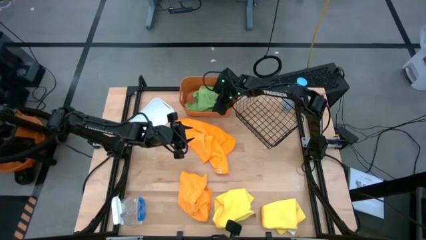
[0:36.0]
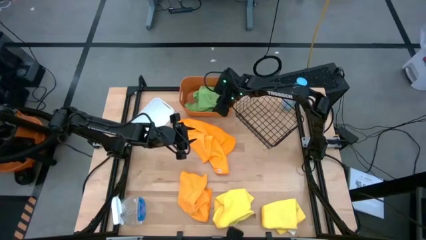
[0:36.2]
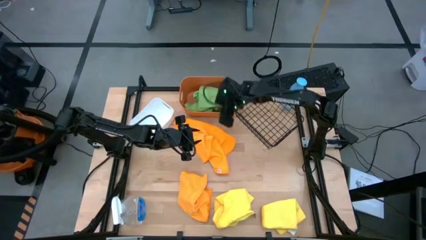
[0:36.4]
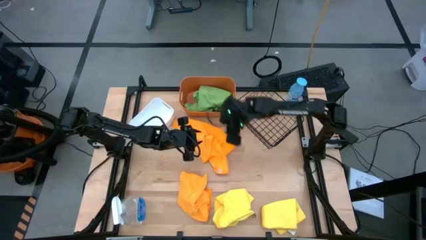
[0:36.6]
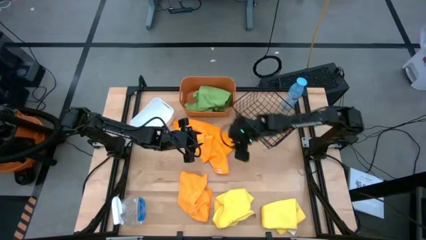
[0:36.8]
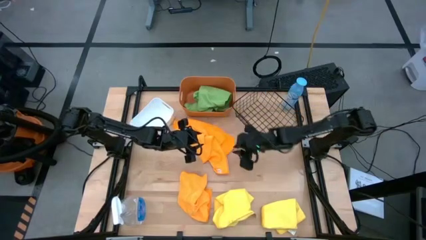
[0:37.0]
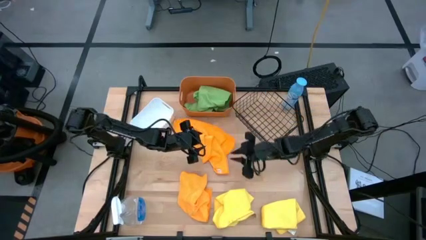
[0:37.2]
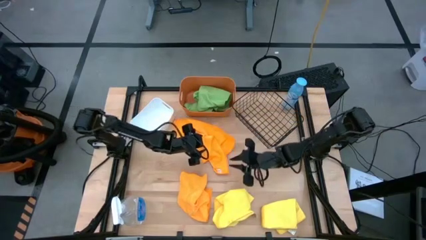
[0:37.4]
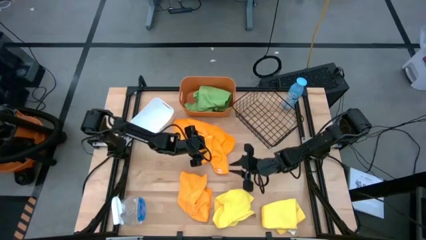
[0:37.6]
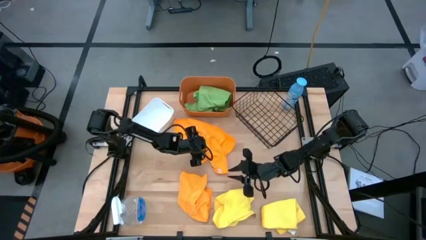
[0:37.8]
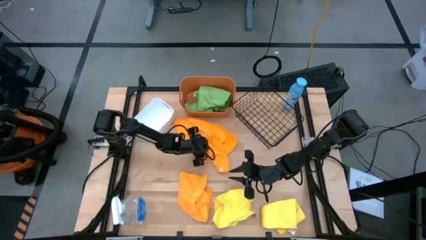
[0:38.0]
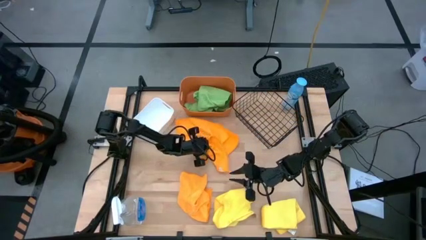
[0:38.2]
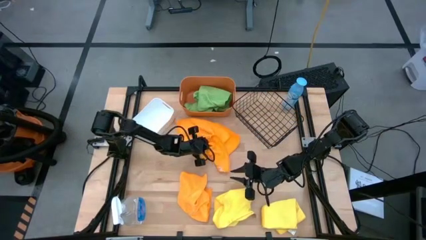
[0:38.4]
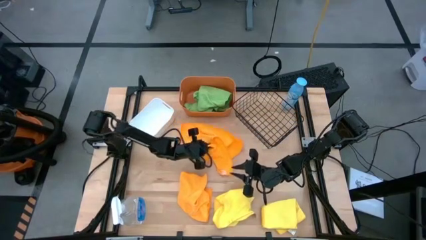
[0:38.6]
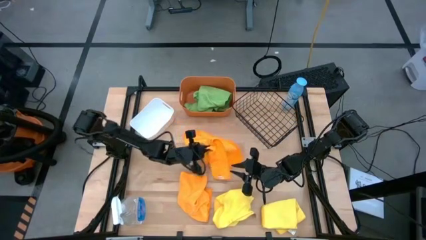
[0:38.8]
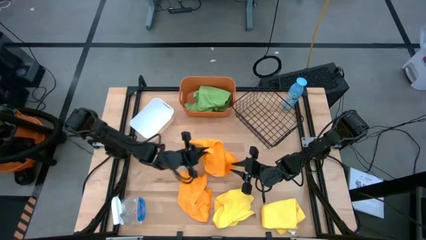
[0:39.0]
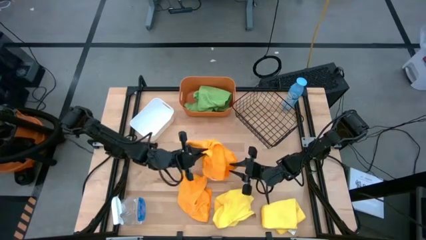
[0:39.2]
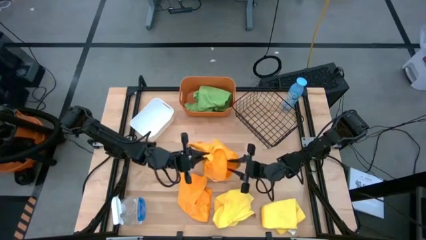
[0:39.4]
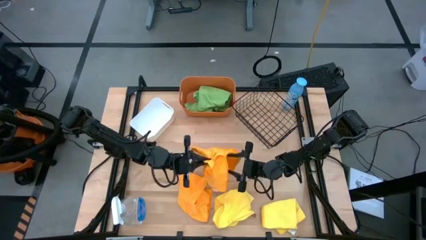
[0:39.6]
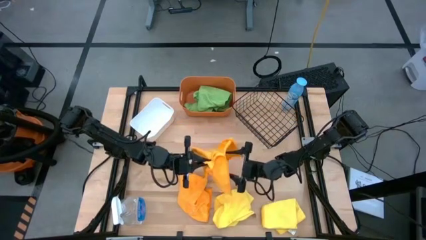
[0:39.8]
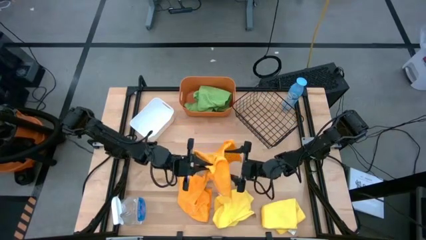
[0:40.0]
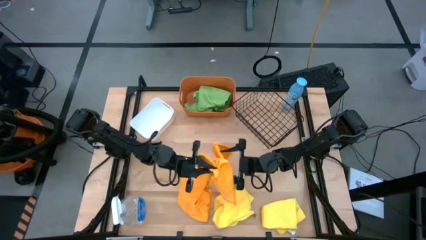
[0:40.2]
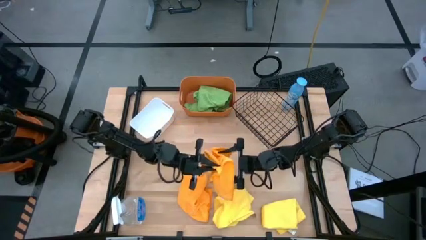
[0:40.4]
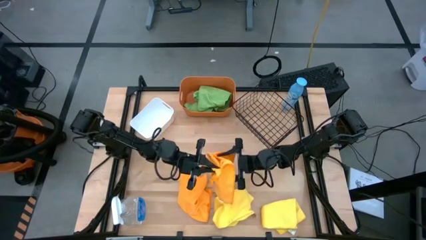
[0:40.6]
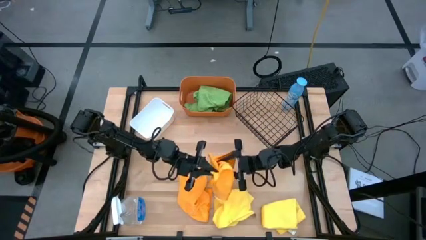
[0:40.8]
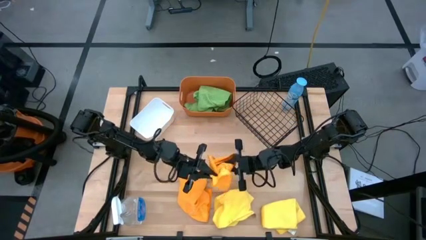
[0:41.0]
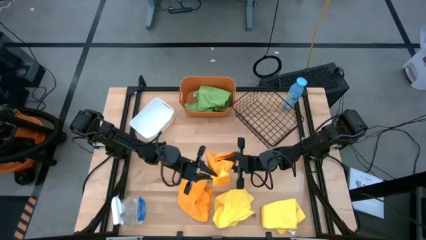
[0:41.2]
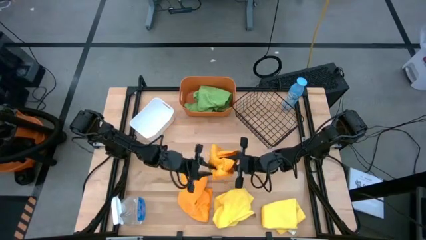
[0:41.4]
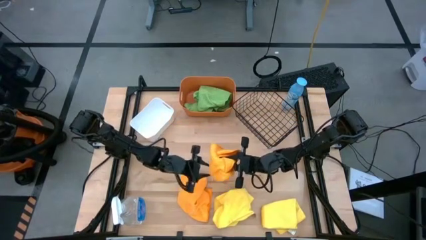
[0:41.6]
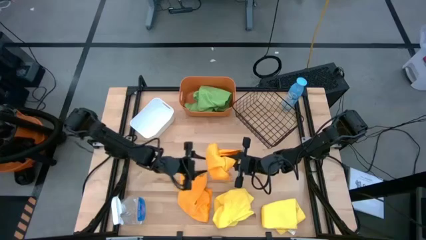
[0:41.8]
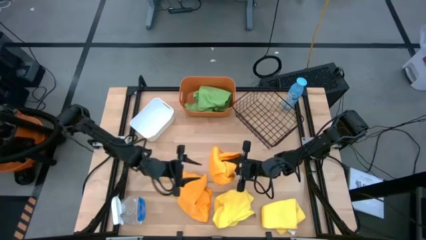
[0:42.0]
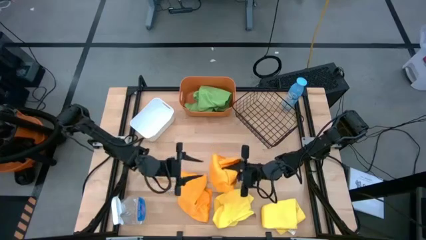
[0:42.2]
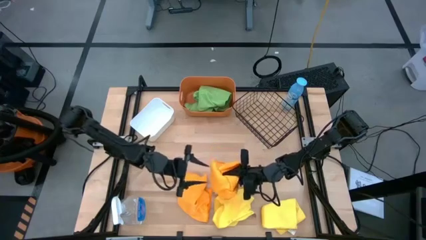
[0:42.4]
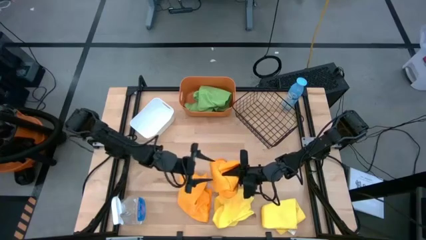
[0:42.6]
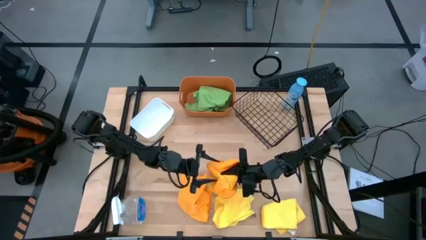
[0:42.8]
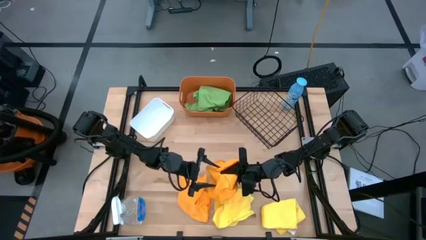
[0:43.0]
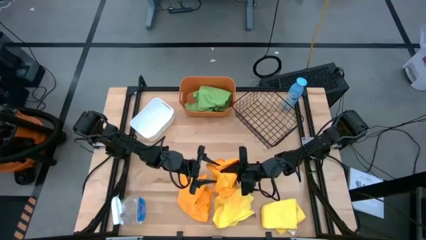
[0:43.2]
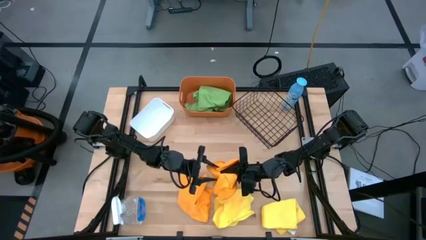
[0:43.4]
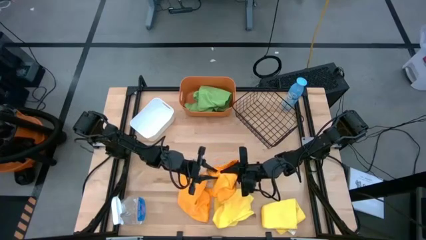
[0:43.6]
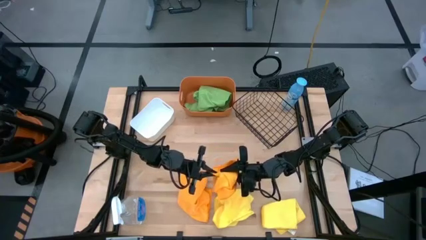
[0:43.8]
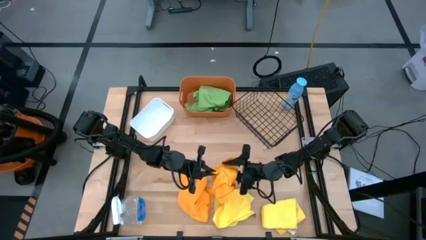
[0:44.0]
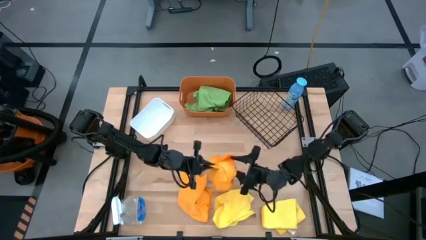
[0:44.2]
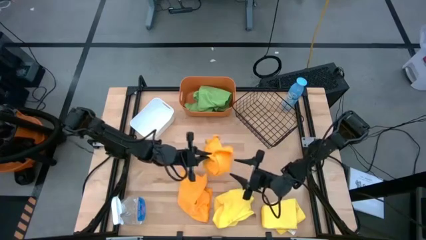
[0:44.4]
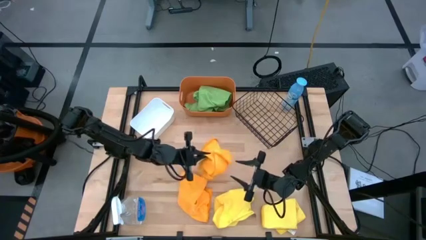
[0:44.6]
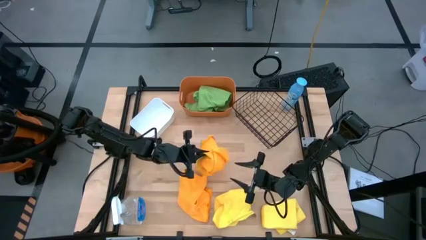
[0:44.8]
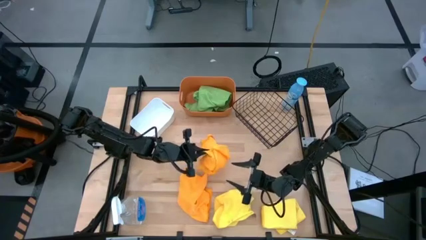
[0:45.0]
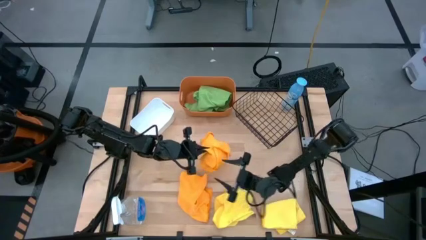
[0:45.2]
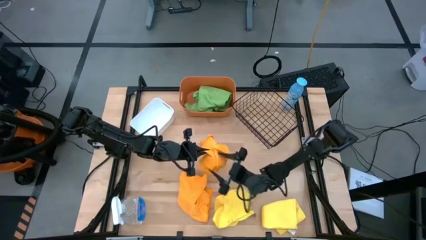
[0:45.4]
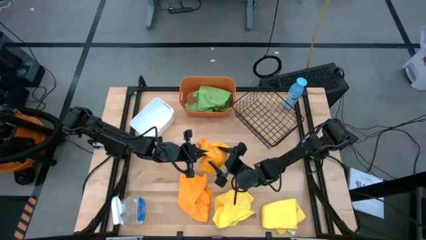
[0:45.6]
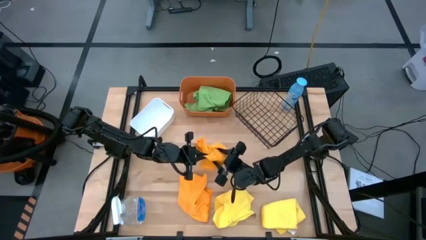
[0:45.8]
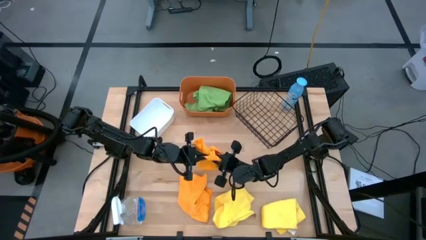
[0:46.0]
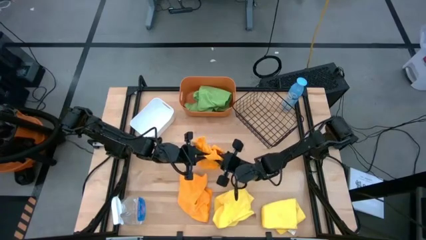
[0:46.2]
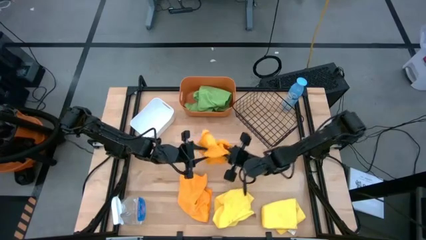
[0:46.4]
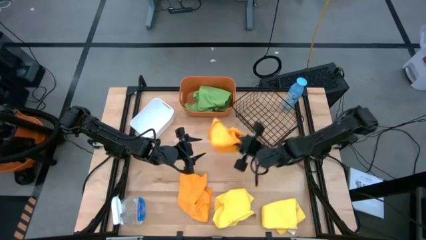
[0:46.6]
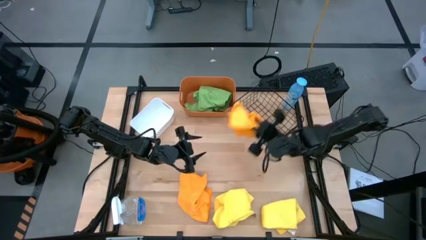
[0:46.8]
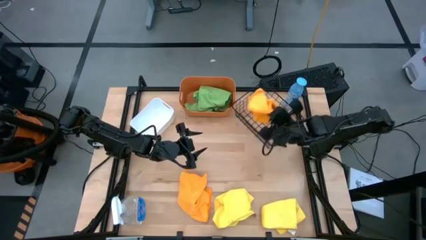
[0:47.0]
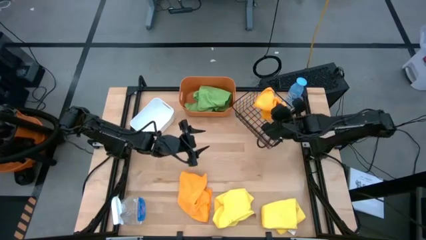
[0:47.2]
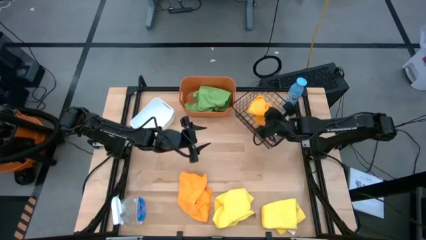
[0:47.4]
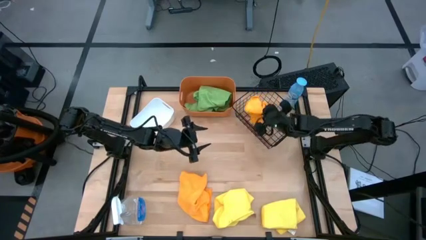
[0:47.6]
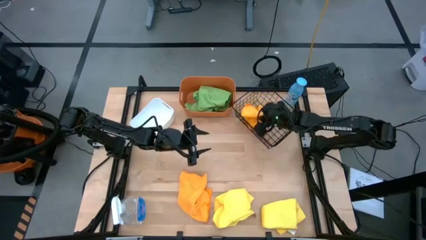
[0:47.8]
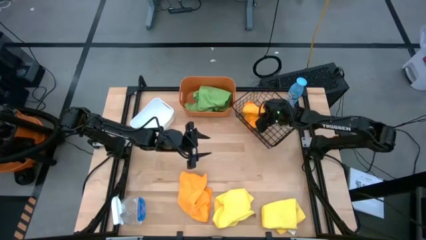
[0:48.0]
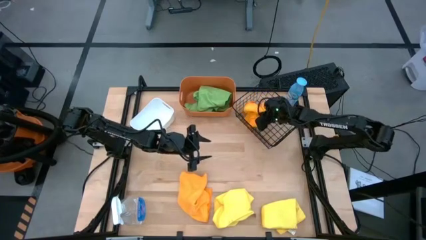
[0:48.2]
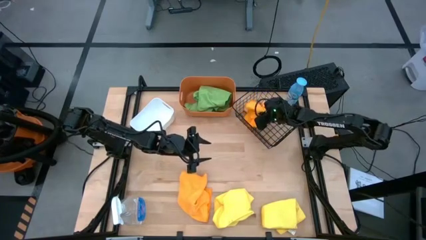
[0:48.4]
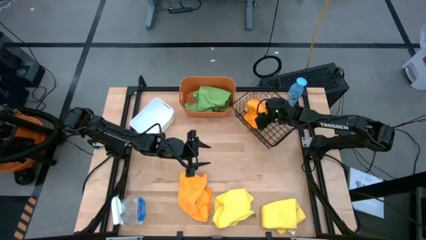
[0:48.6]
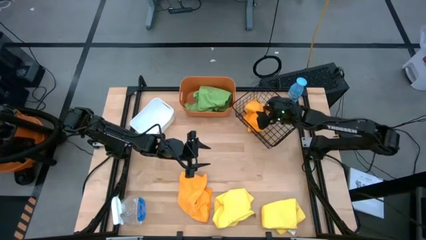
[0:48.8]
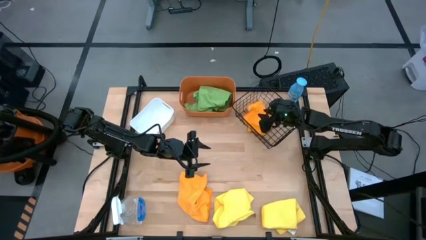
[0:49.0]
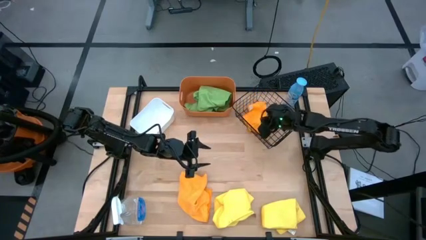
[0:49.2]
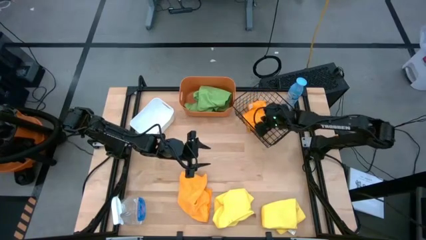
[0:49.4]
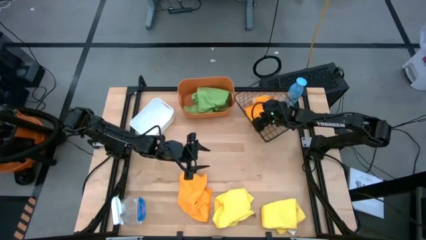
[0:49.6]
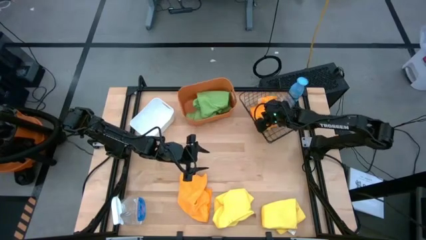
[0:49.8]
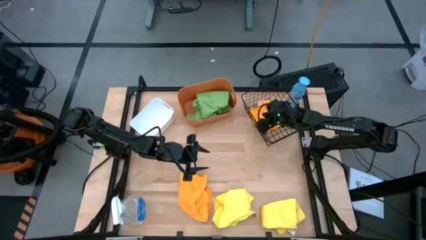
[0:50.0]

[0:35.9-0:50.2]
Task: Sort microfiber towel by color & place in baskets
Put the top orange towel into the wire basket
